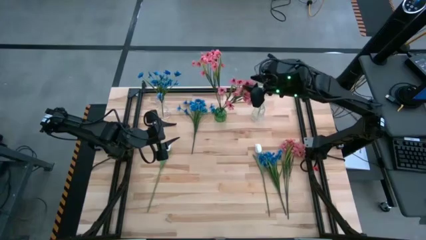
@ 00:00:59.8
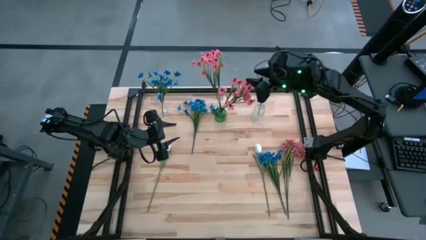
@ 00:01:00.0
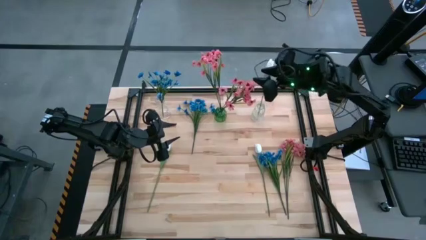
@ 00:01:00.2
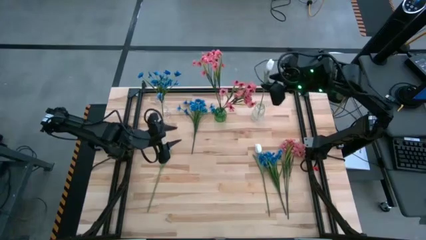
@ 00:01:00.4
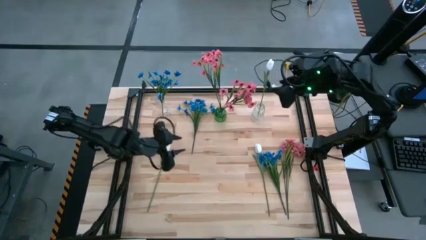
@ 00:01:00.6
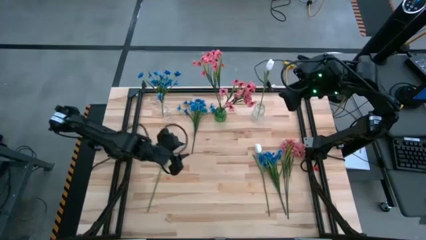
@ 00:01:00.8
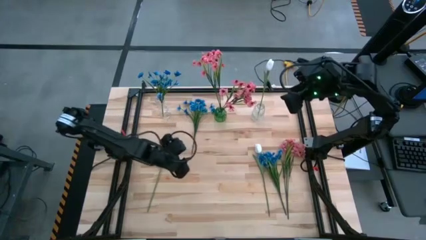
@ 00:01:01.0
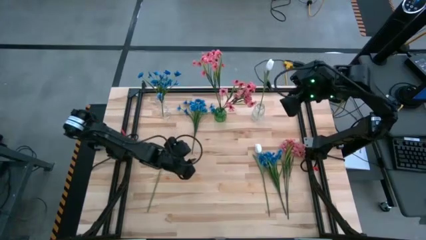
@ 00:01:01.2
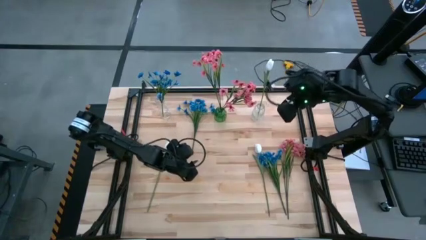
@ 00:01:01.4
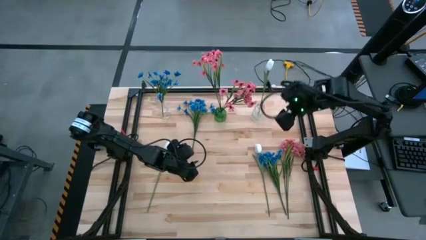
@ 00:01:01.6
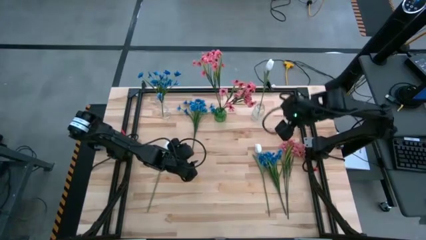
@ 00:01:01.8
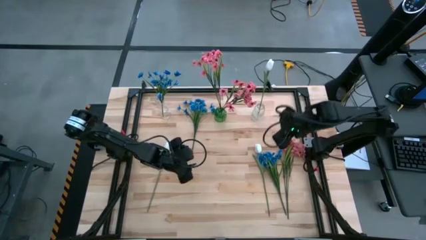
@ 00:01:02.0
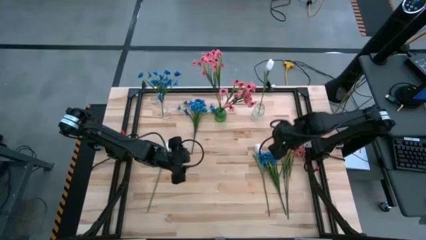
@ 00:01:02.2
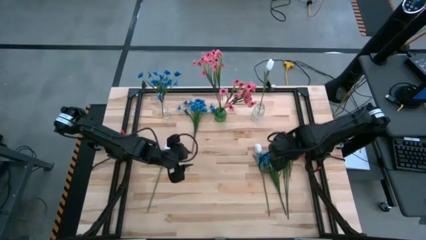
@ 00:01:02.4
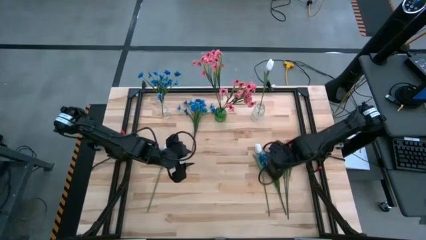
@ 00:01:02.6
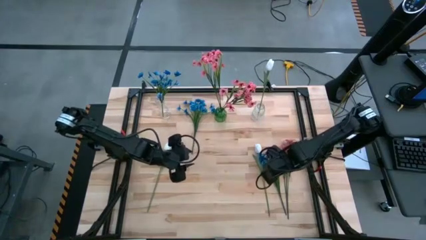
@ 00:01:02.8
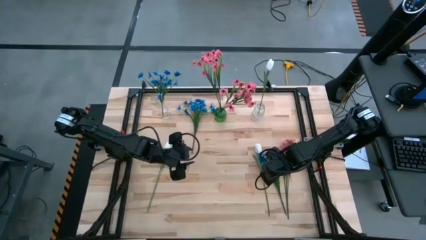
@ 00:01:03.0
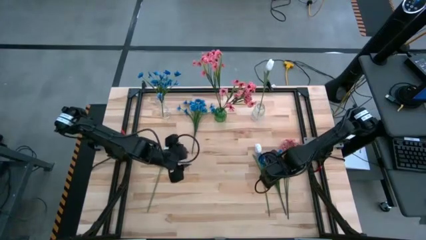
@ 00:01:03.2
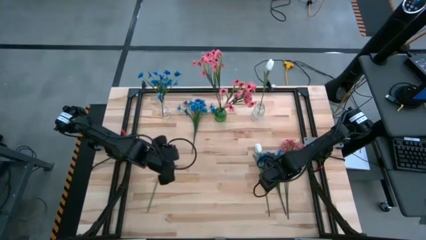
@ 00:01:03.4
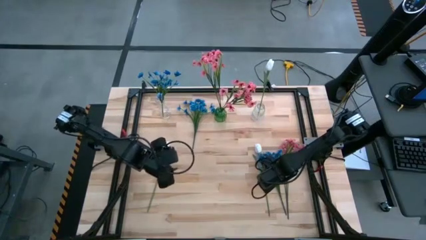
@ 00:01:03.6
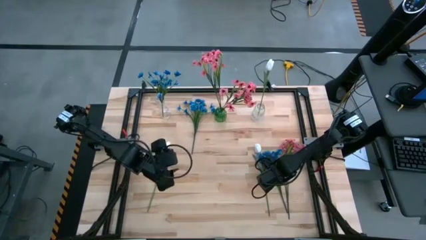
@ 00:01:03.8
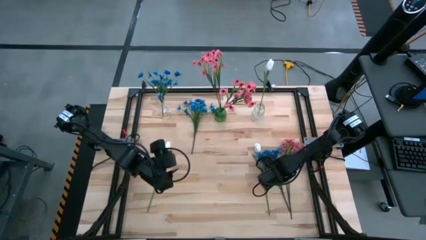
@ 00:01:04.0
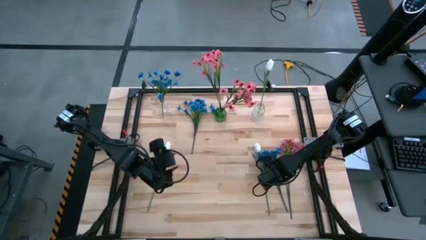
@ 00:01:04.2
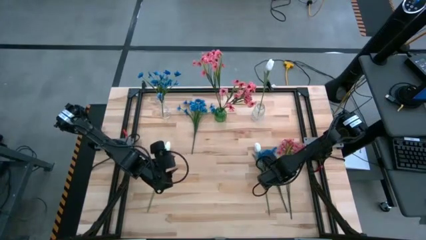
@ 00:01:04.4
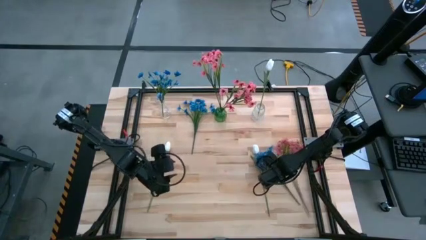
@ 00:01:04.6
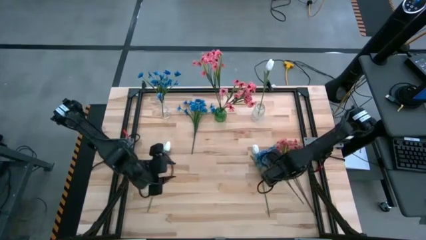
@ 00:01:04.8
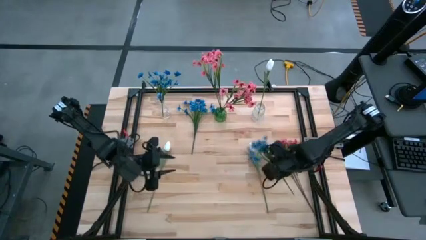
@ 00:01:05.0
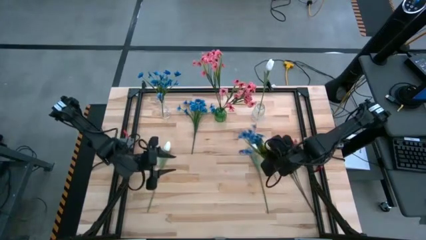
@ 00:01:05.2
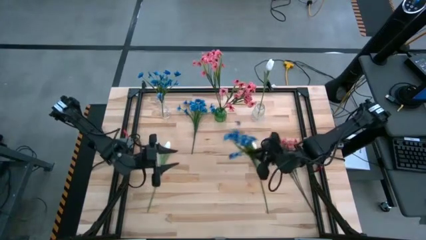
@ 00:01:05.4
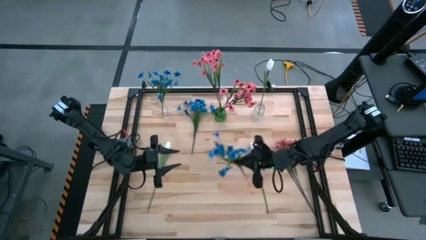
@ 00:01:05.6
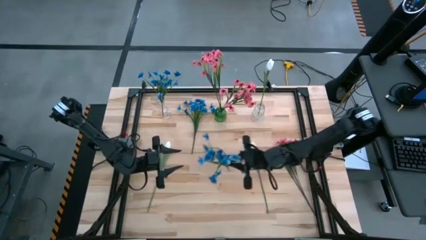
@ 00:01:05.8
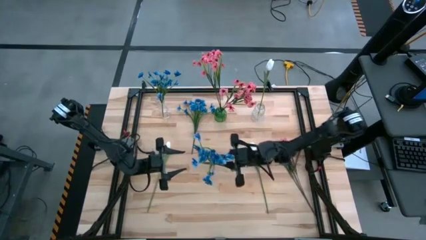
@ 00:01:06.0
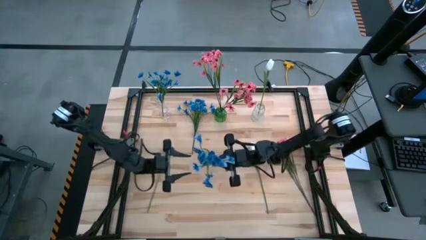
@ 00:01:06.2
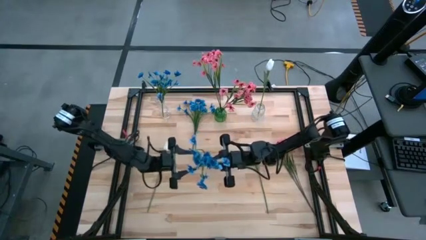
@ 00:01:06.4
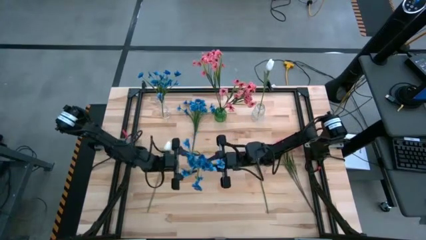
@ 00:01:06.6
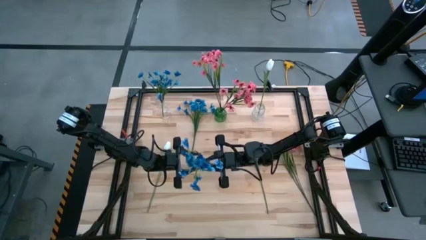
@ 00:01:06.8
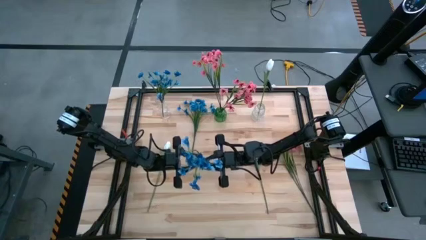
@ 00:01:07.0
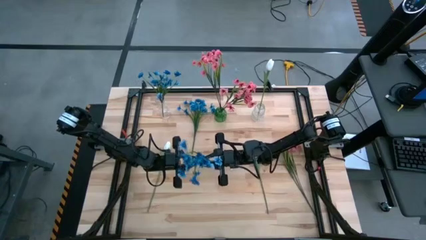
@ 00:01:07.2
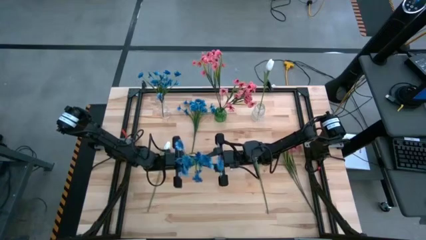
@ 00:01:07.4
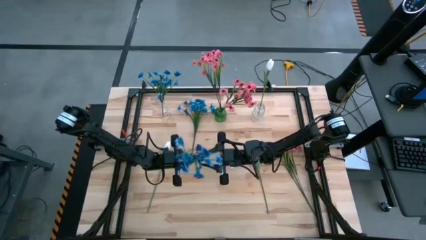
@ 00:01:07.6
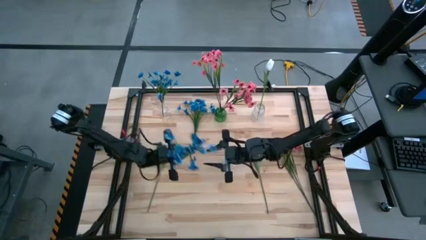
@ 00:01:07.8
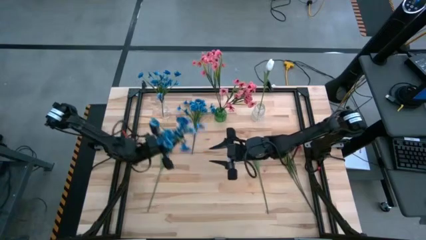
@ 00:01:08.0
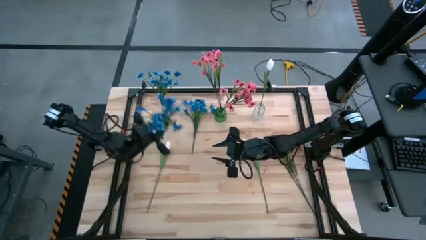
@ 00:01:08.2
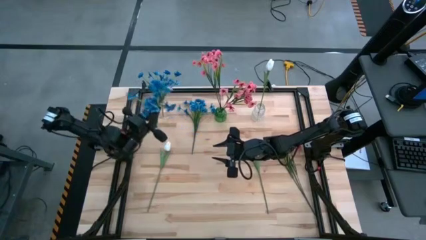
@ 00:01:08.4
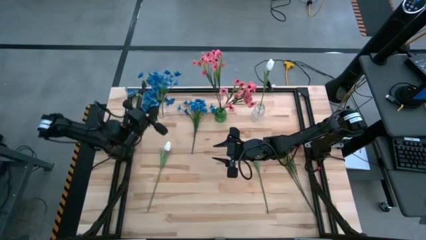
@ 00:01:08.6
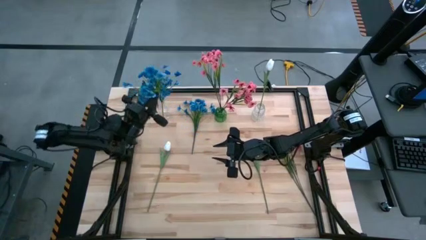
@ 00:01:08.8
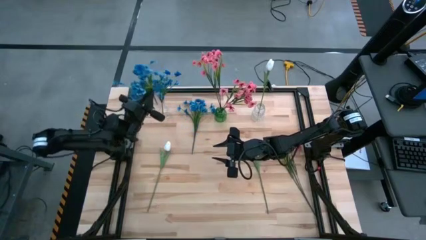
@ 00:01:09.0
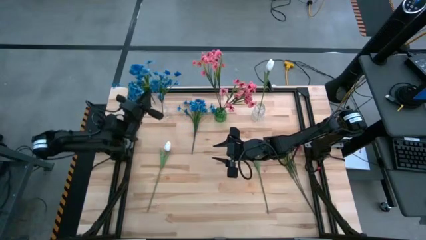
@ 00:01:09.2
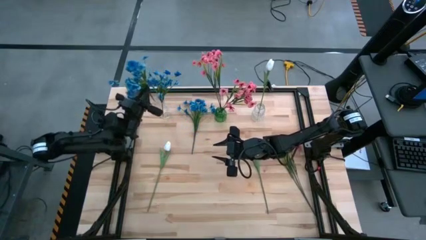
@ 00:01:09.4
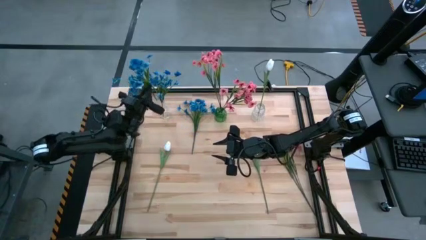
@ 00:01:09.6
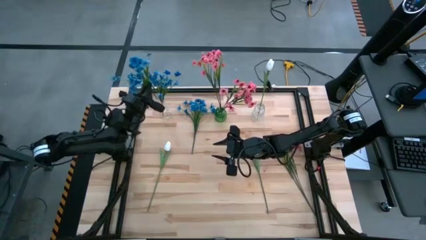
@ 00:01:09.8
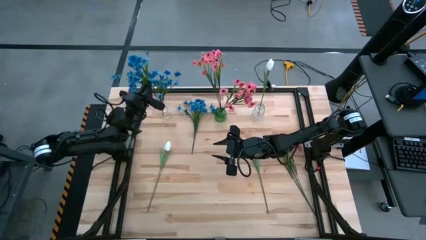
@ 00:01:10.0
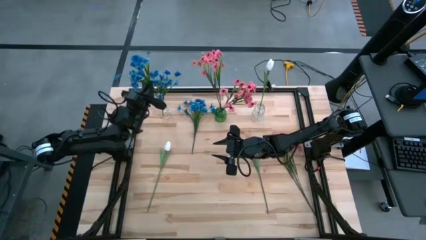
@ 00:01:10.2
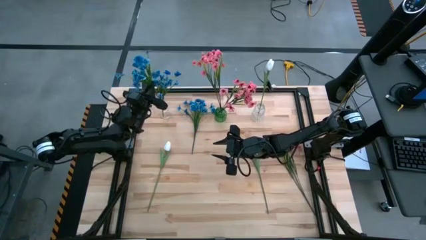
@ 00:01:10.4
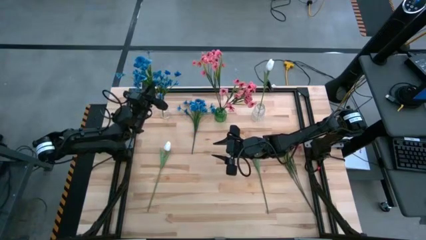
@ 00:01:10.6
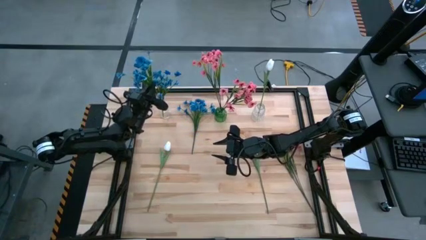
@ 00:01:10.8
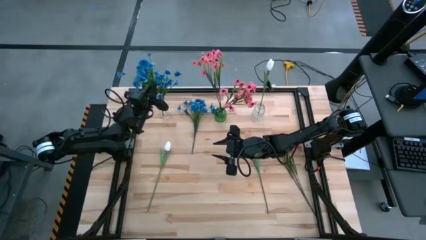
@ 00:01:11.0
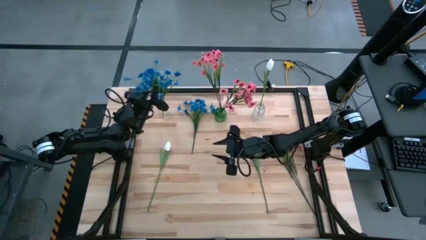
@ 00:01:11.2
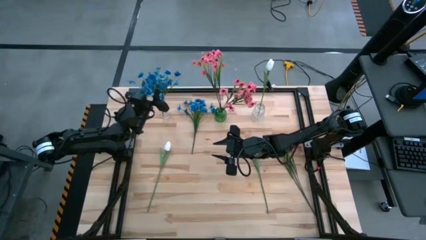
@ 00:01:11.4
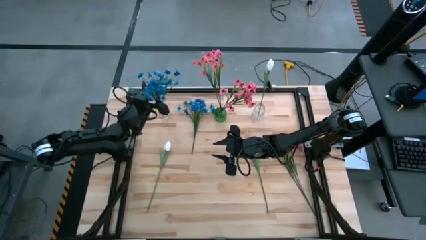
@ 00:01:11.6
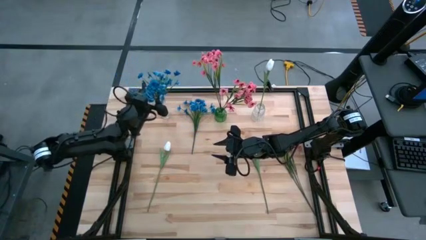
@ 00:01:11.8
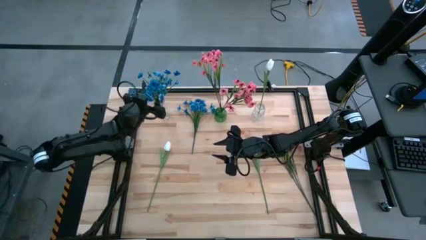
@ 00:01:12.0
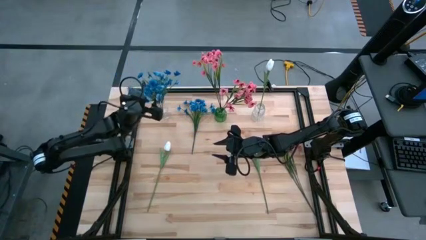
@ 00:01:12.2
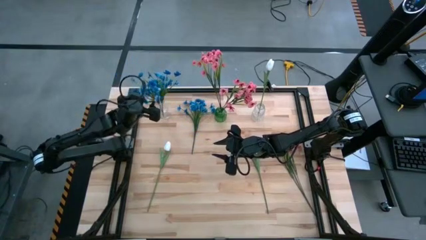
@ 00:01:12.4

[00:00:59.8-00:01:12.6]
Task: Sort flowers into vase by color
Put the bottom blue flowers into the left transparent vase
